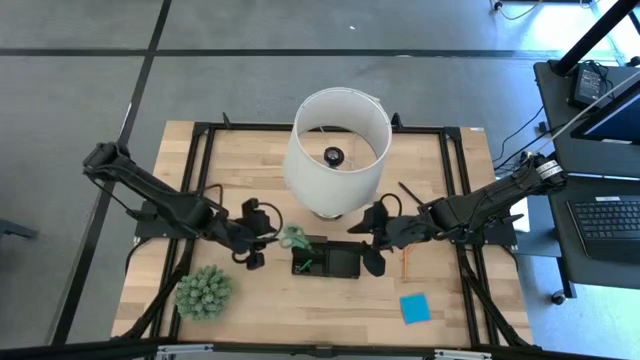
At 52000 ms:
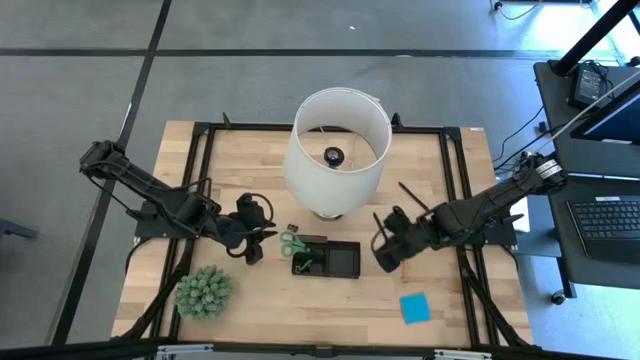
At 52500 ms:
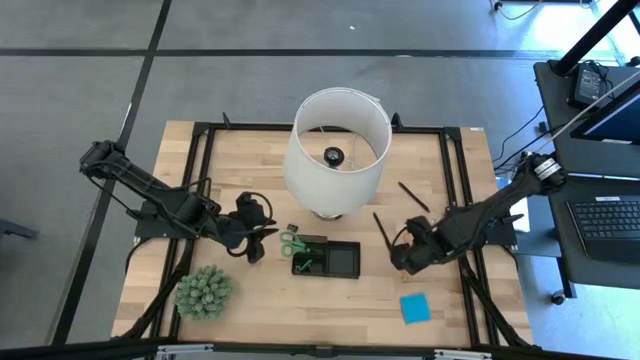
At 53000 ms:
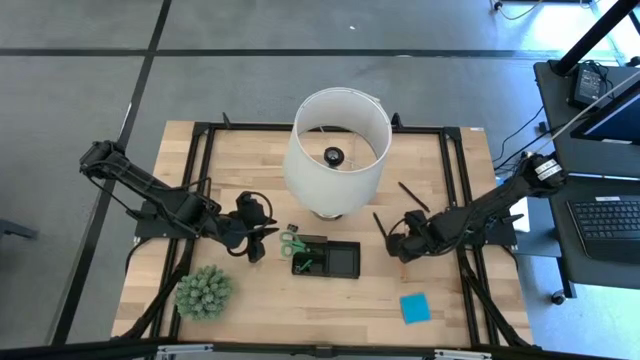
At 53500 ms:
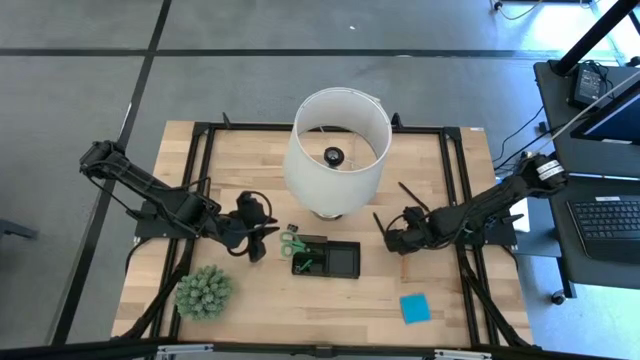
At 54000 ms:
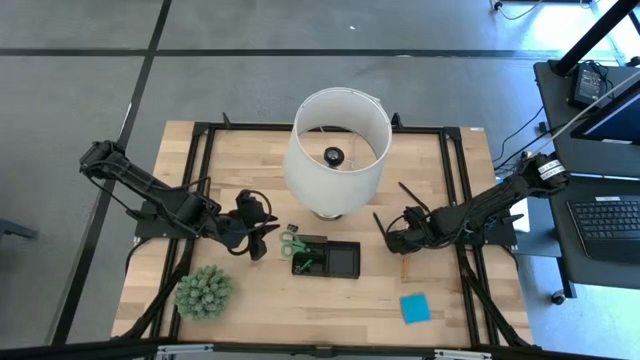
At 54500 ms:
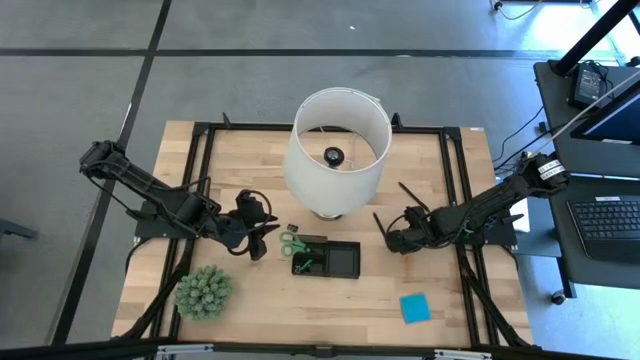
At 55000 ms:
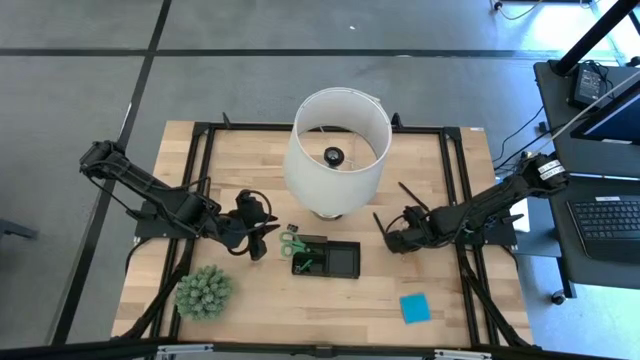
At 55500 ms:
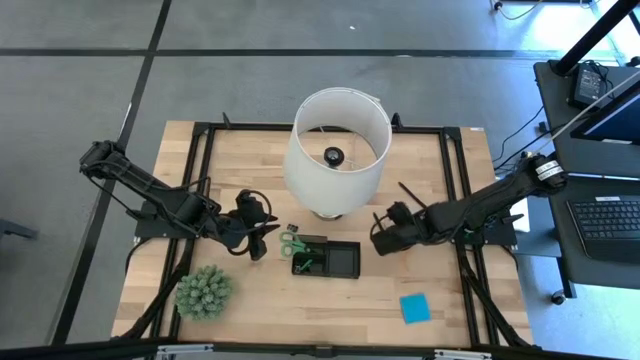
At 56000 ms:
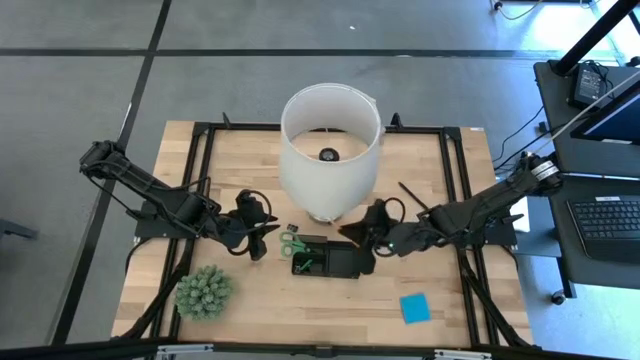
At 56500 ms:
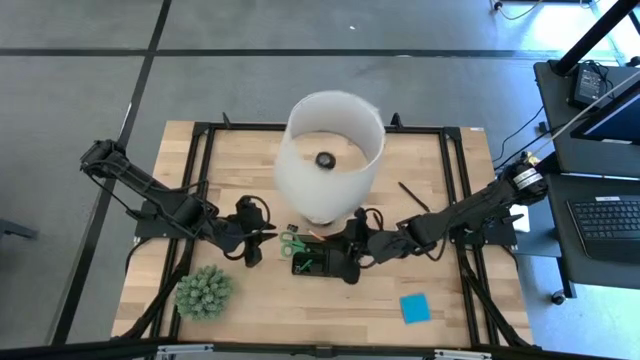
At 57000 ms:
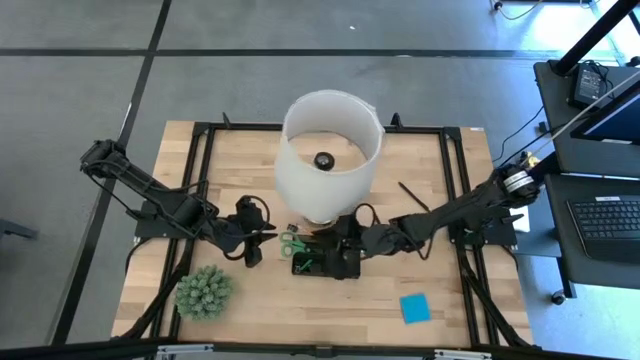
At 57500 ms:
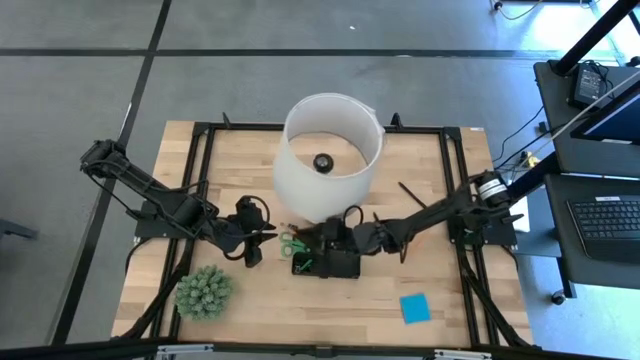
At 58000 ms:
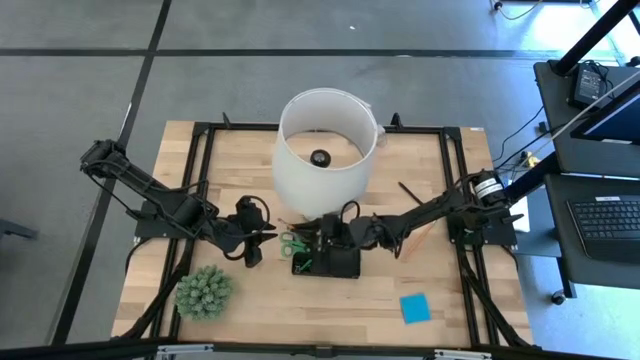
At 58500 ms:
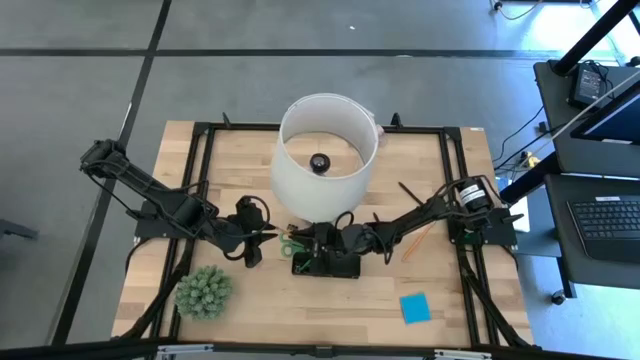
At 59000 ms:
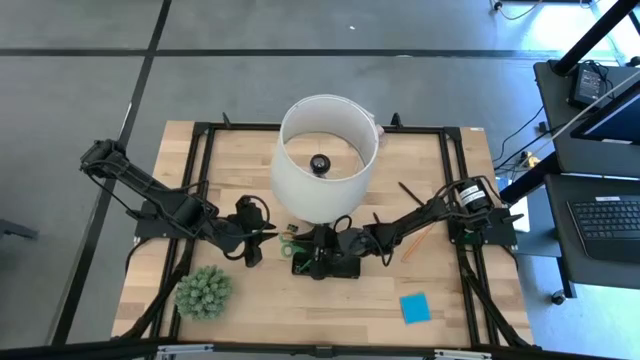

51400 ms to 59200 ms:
Task: Pick and place office supplies into organizer
Put the left orange pencil into the black desk organizer

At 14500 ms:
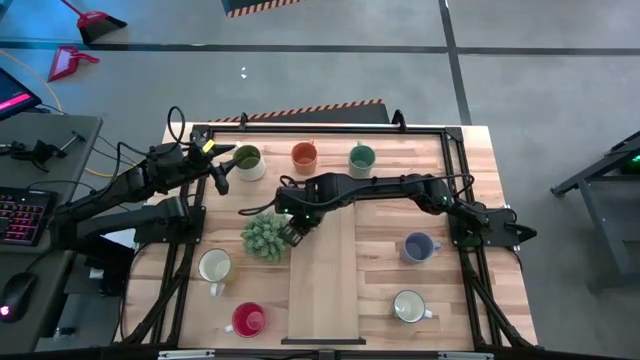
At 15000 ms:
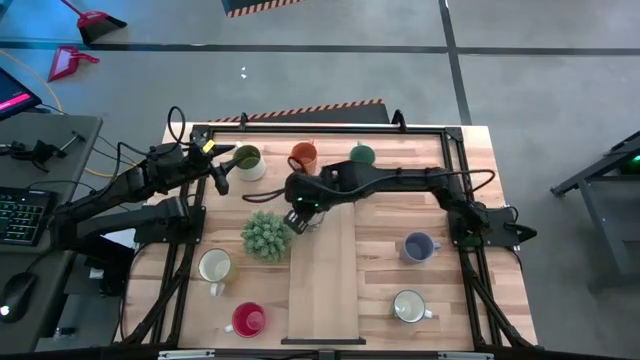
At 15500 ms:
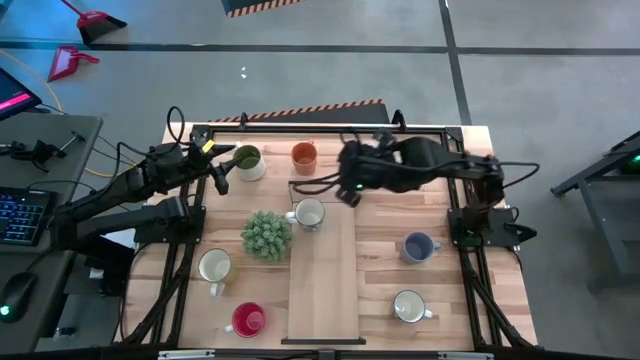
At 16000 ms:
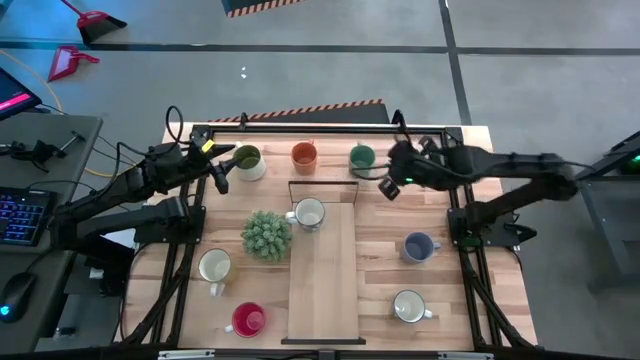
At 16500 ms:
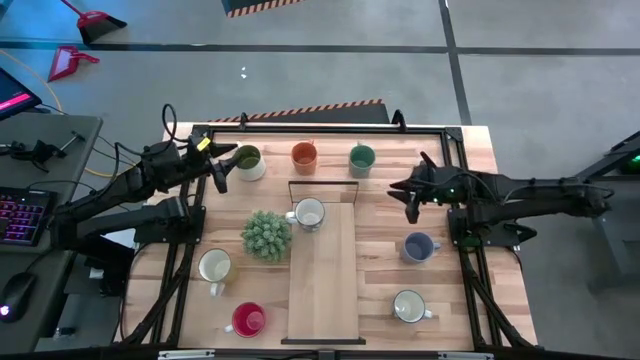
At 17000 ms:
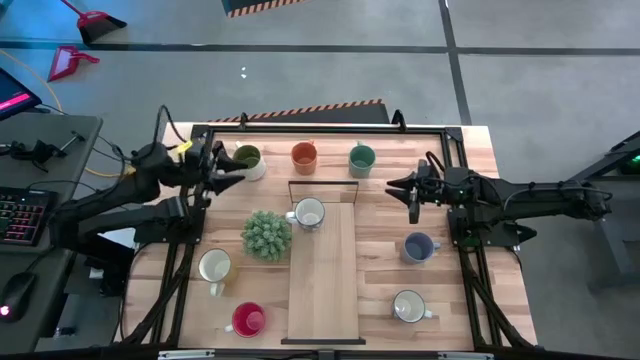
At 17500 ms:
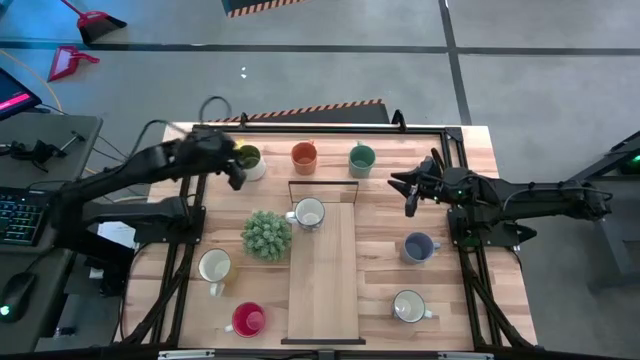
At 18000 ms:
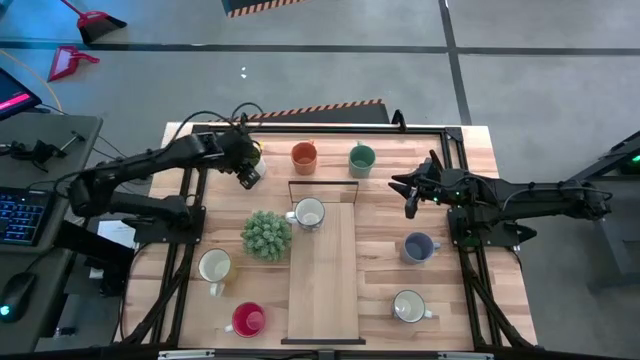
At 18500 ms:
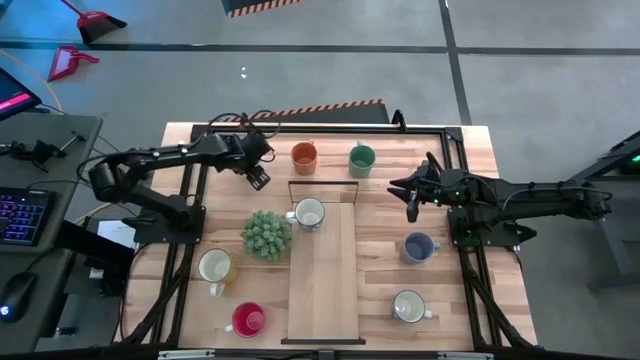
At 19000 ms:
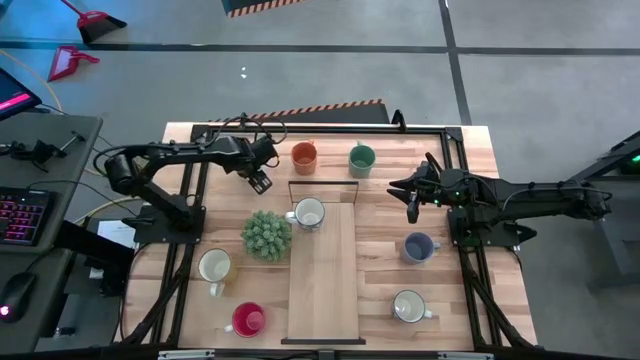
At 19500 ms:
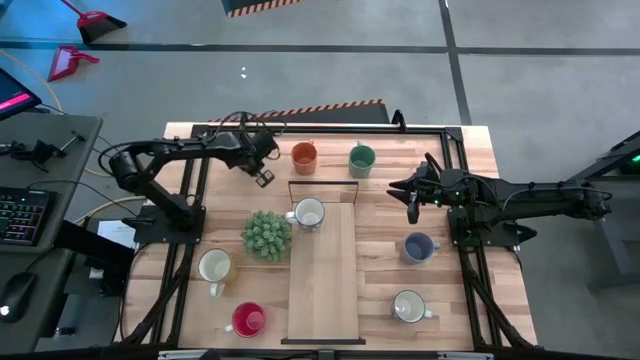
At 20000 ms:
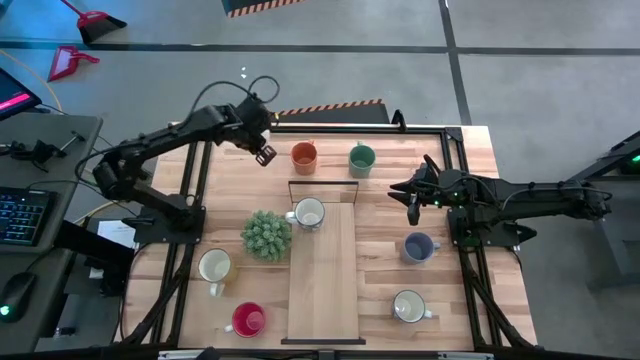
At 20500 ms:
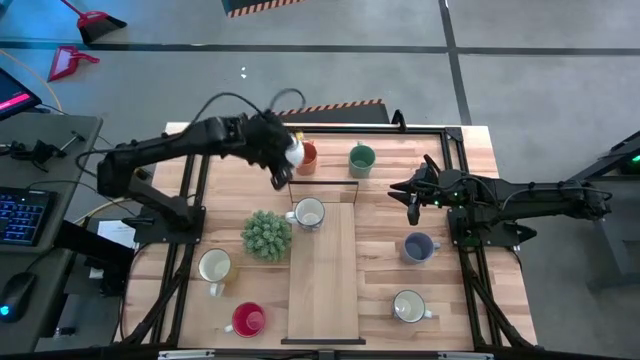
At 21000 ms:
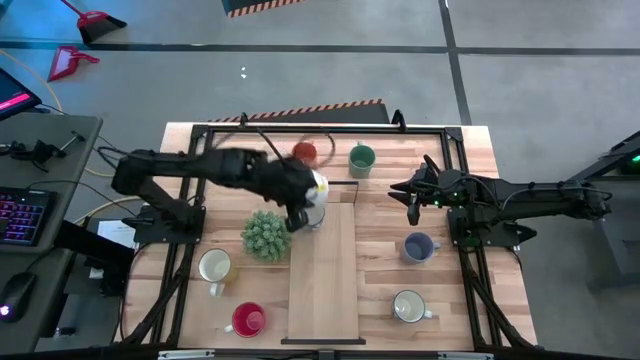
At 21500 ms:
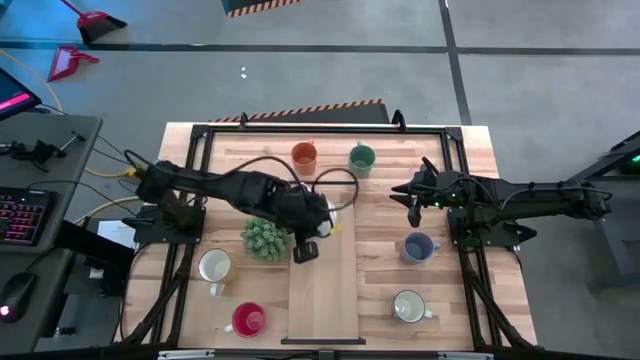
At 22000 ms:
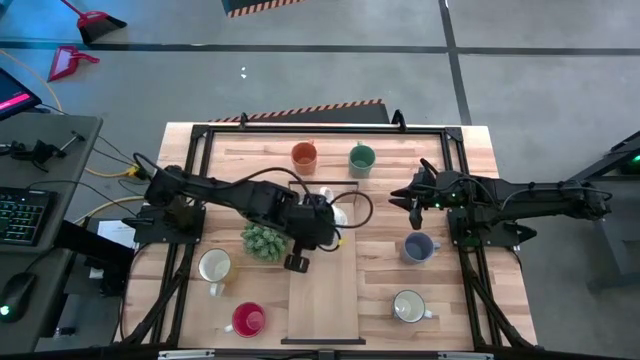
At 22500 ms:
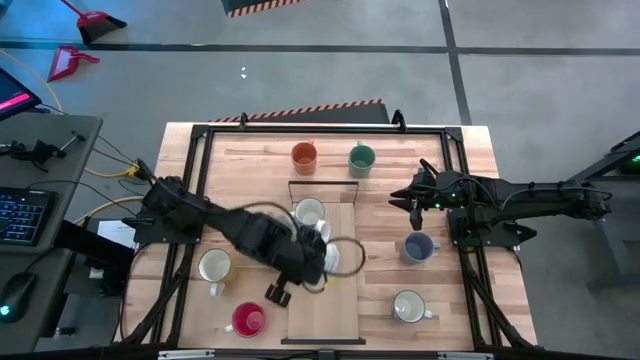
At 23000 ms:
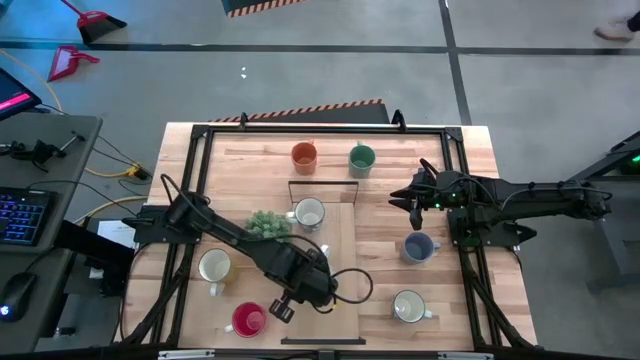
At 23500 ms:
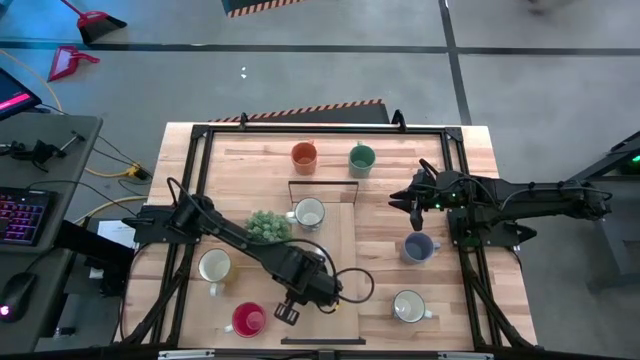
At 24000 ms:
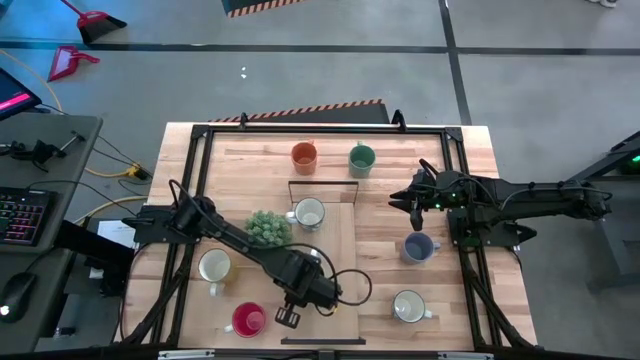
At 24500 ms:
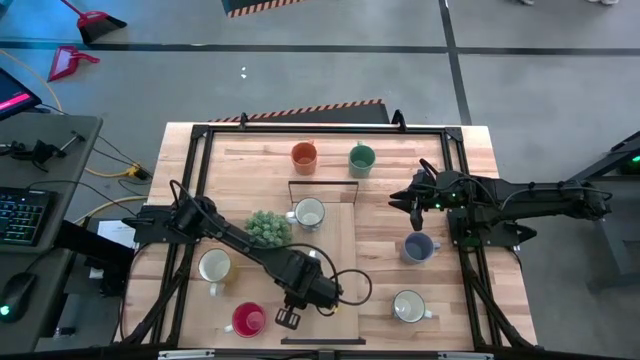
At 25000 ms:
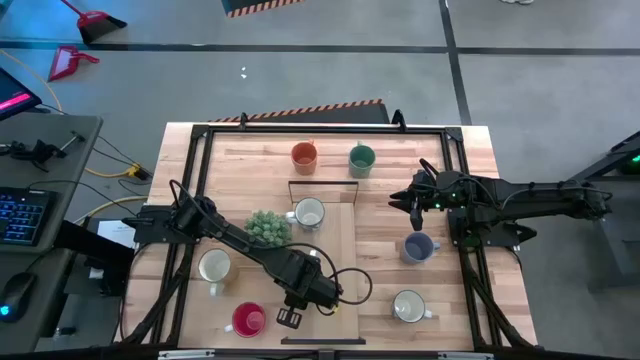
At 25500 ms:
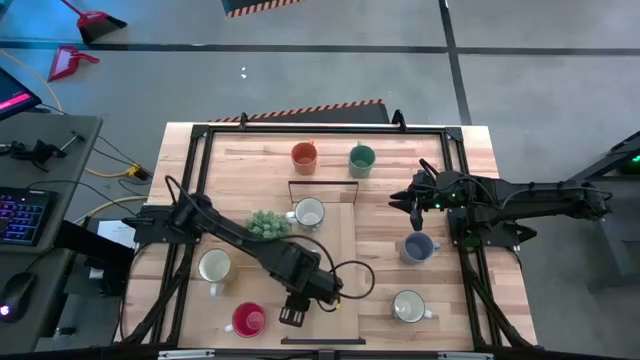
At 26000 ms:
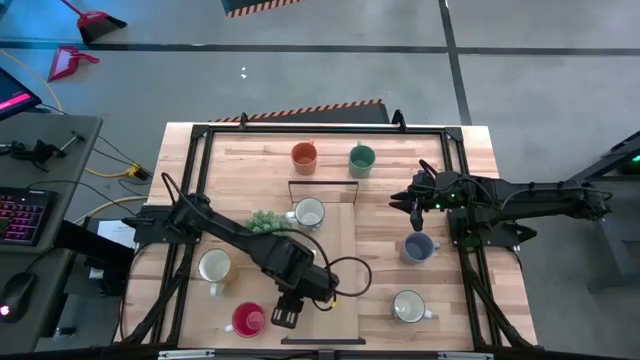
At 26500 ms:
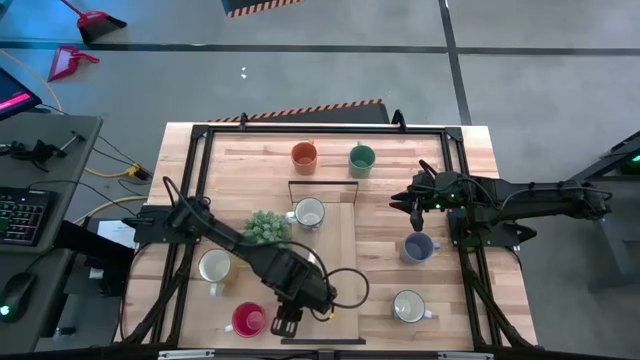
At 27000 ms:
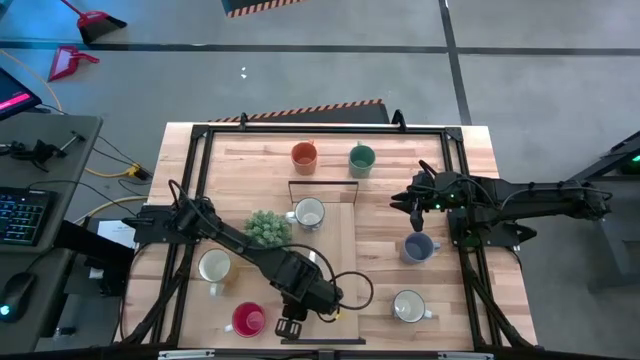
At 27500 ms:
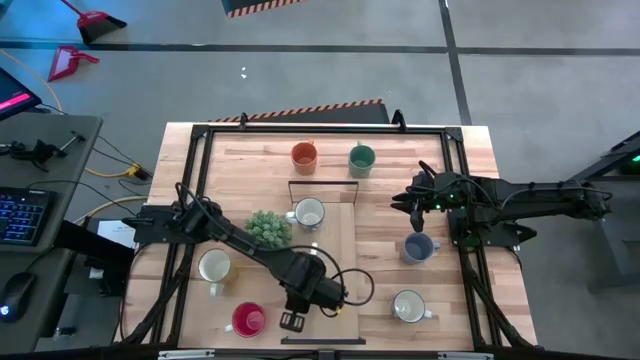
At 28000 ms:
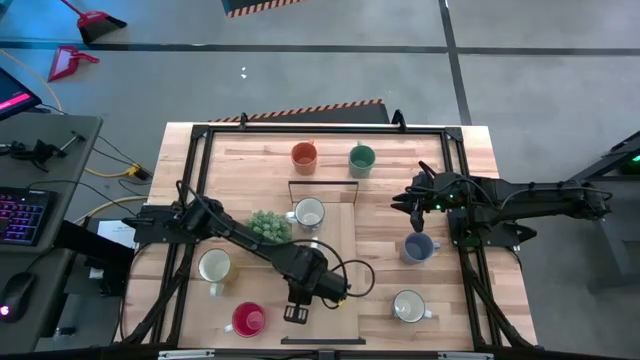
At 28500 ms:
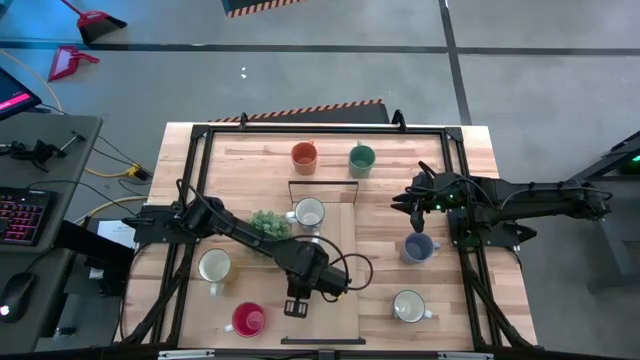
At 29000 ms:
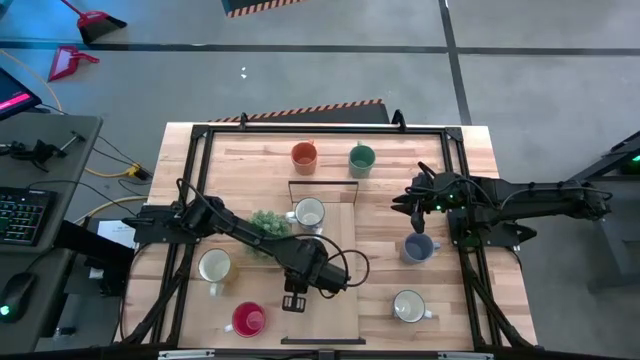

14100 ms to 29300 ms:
Task: Place coffee mugs
Put the dark green mug on the shelf
